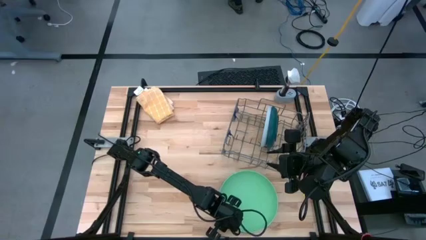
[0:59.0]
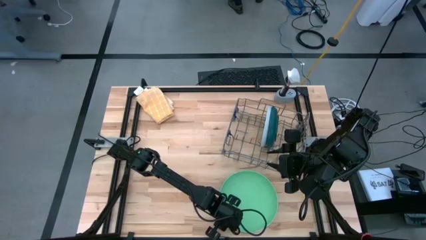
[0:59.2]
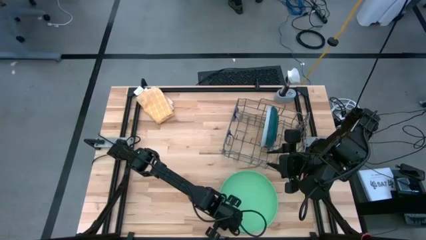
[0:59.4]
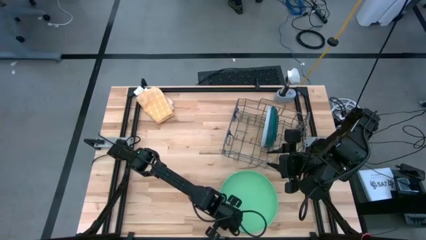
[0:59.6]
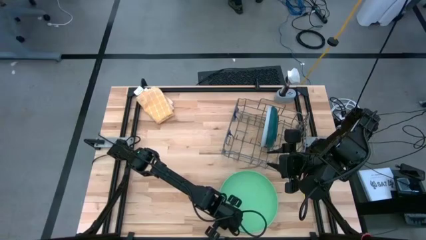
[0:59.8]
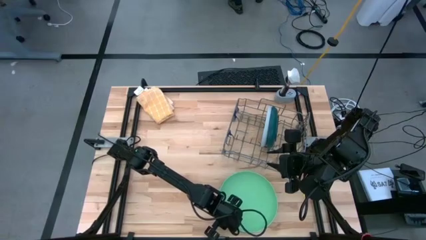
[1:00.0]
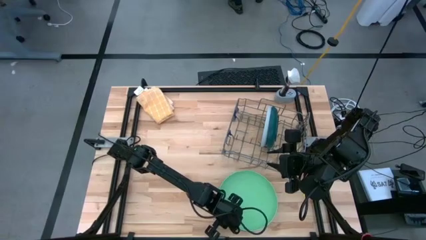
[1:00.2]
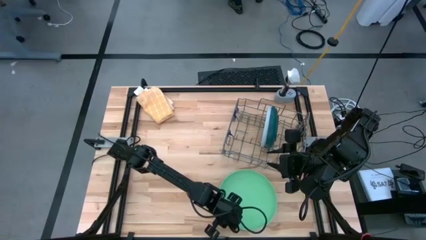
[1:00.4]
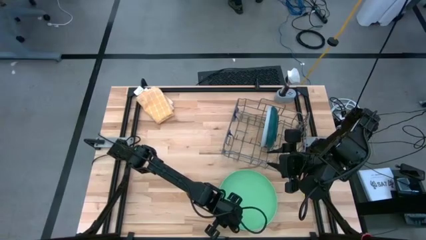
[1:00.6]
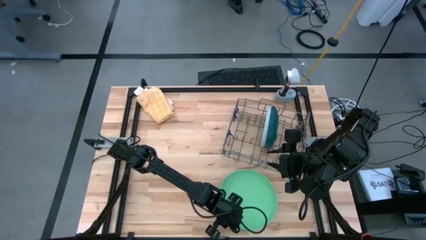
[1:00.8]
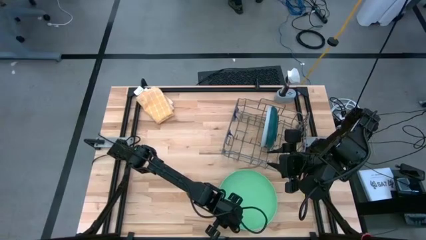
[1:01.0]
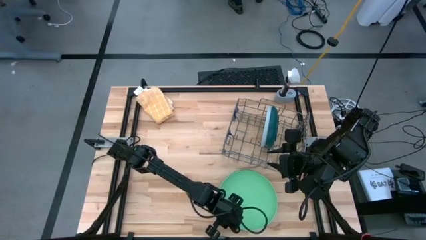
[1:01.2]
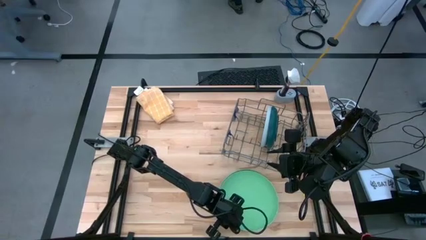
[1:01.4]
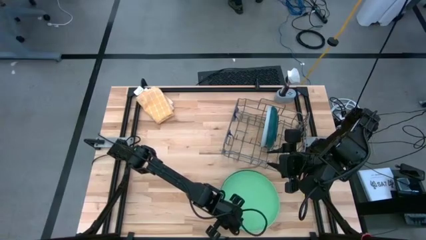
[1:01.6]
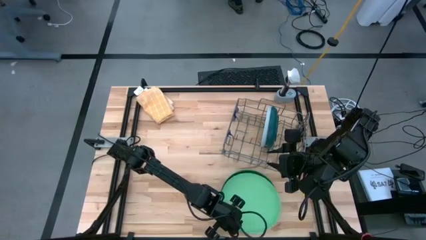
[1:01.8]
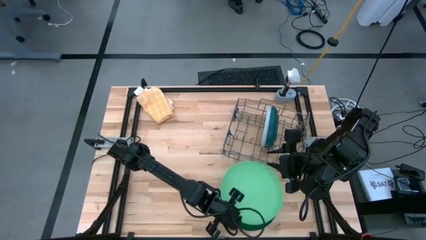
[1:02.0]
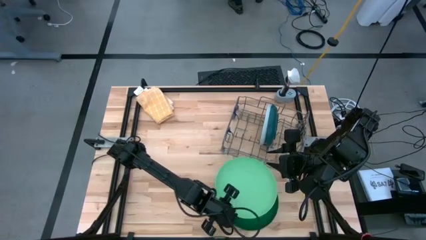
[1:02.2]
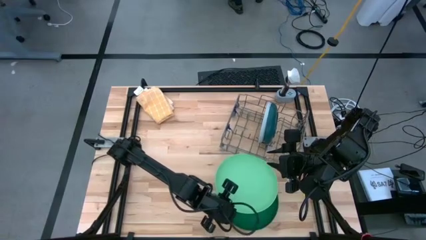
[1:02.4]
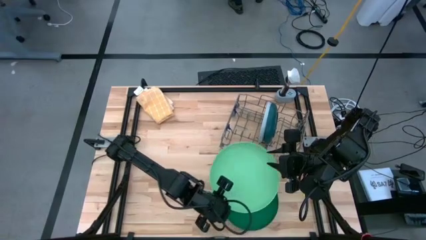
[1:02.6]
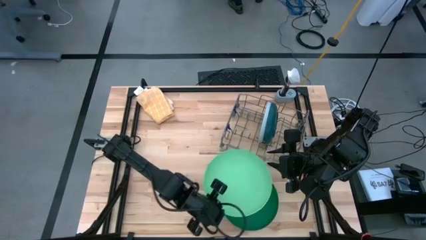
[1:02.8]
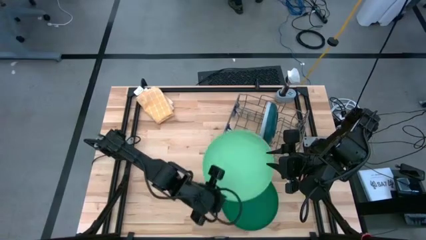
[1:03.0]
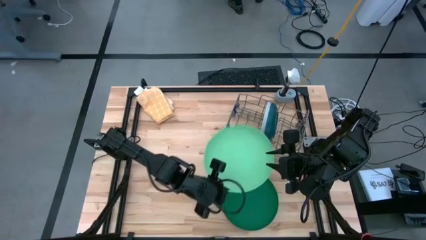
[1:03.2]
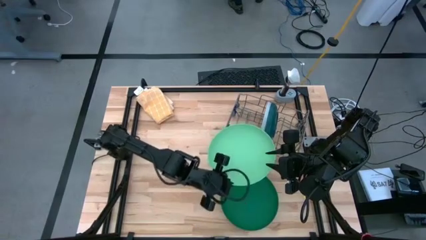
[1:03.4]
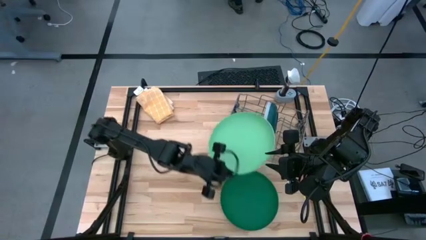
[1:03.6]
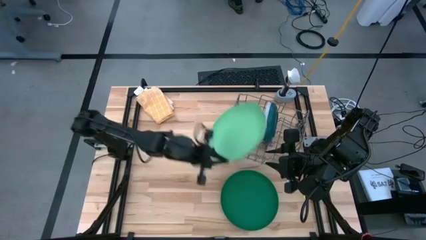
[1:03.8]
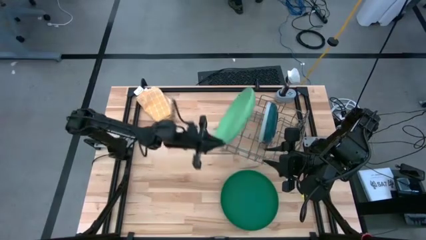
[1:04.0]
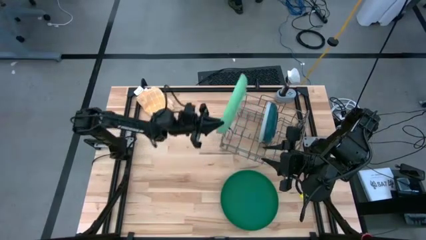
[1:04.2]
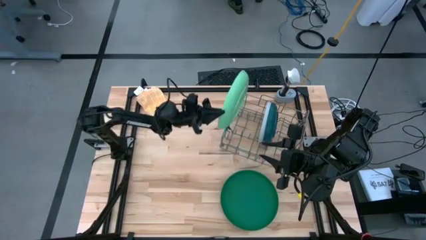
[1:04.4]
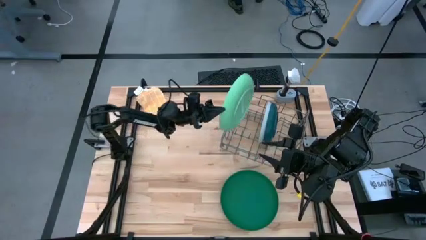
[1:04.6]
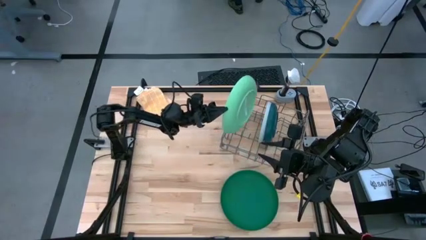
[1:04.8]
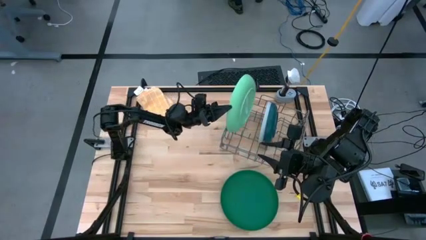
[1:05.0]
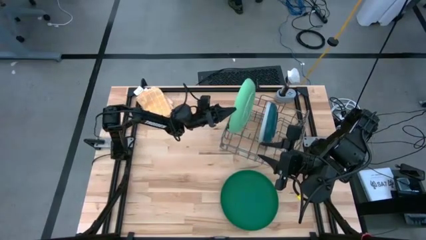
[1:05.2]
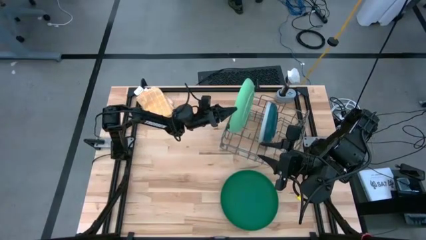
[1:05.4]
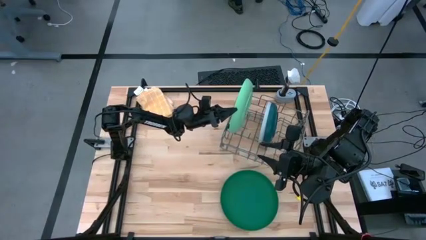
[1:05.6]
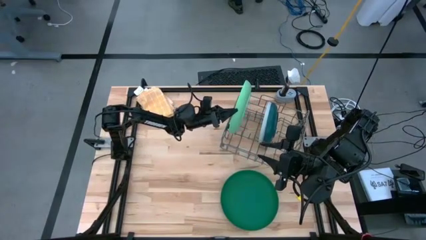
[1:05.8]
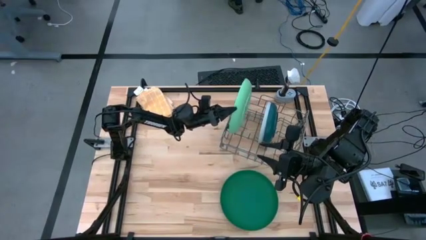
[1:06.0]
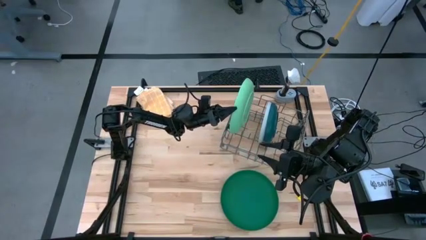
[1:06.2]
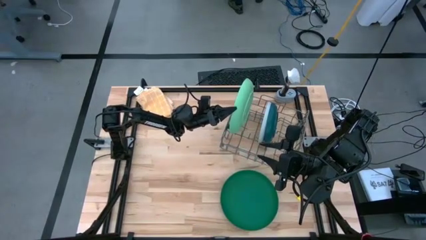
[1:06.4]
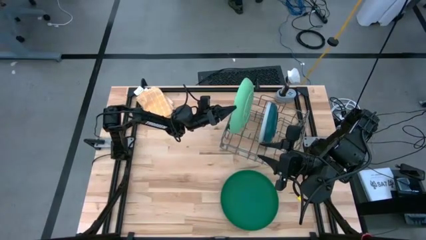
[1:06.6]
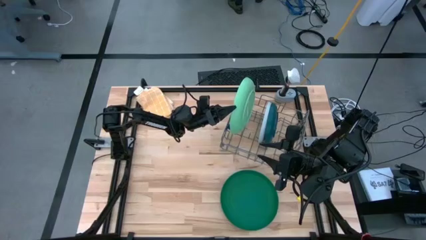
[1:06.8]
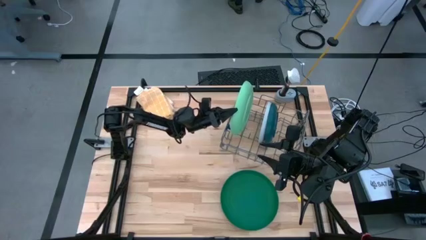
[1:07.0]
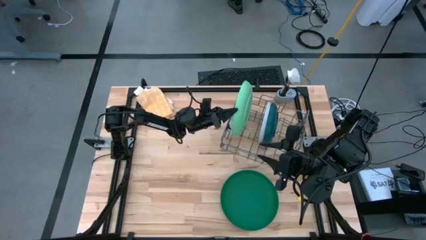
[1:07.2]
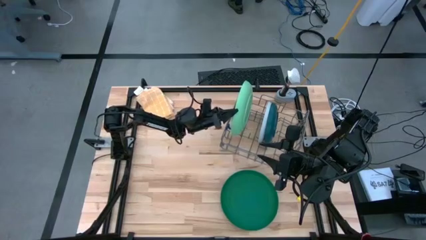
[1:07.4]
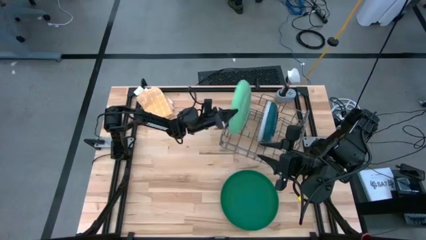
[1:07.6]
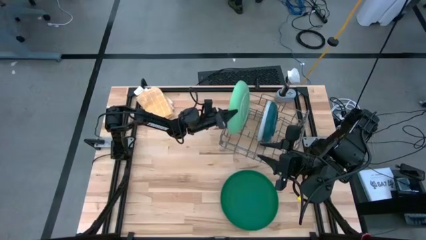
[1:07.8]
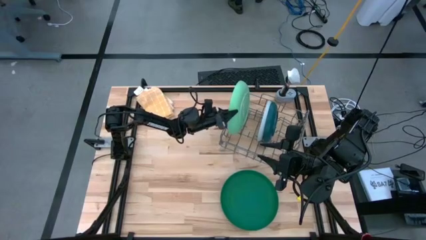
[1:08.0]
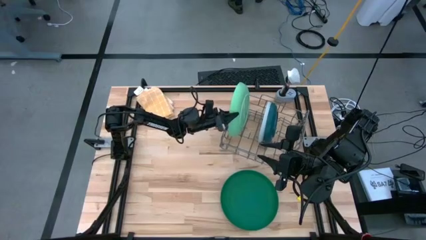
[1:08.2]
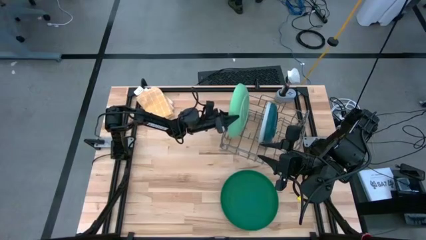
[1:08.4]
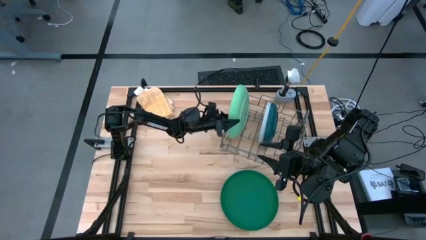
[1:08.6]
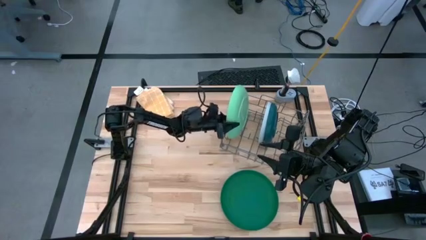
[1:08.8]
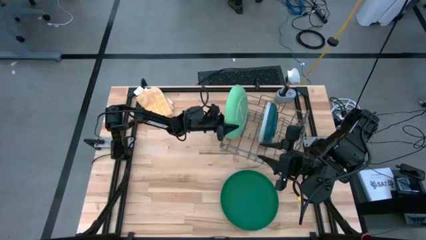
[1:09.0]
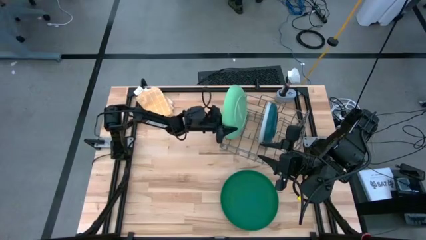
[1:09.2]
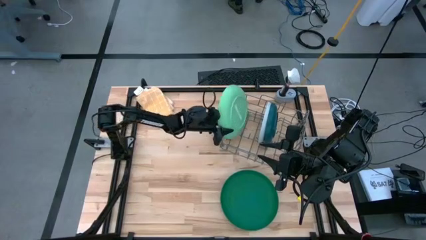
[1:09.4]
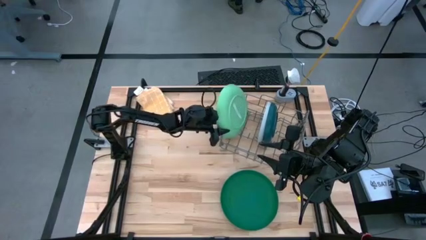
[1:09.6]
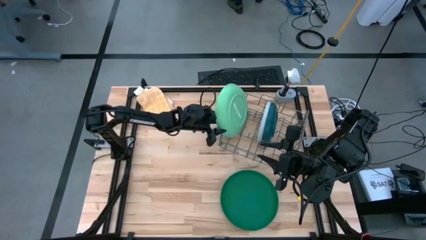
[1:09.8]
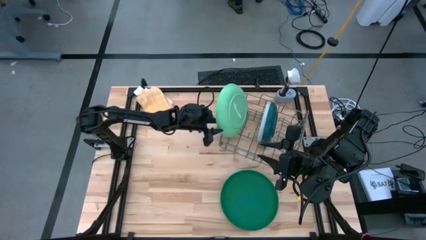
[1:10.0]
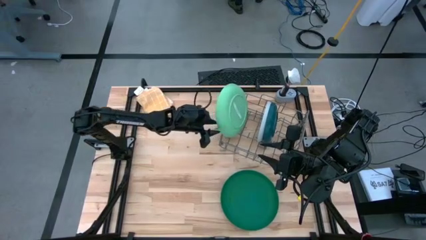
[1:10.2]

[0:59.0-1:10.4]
Task: Sort dishes
Put the light green plate in the dish rack

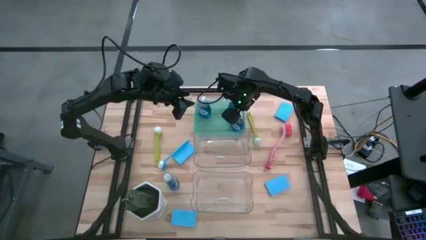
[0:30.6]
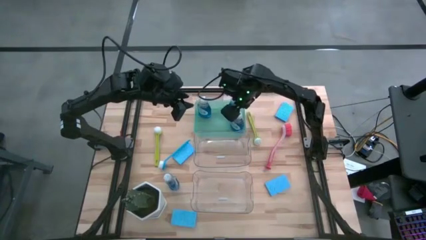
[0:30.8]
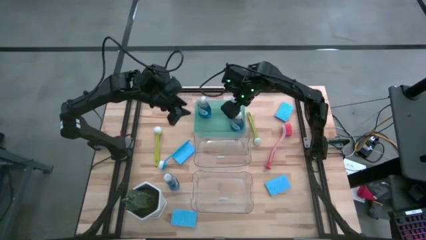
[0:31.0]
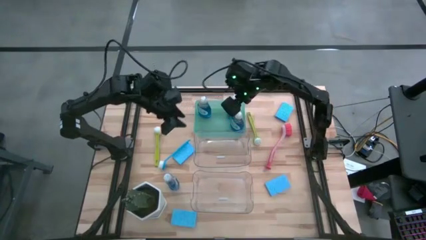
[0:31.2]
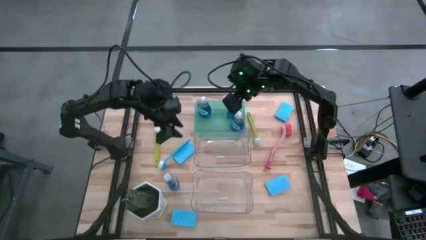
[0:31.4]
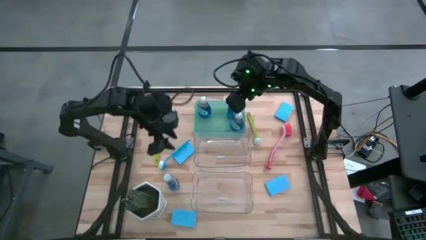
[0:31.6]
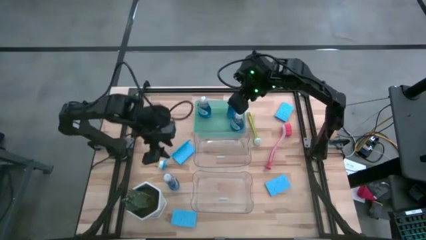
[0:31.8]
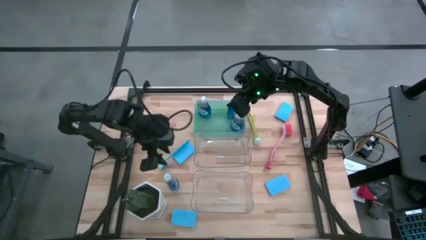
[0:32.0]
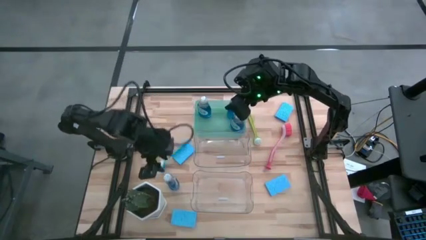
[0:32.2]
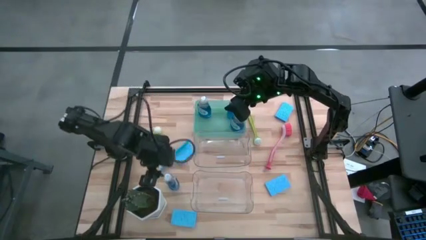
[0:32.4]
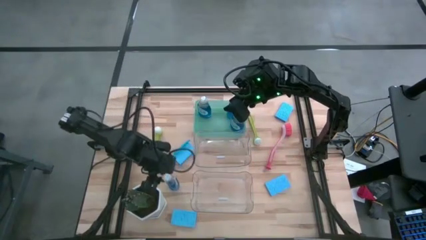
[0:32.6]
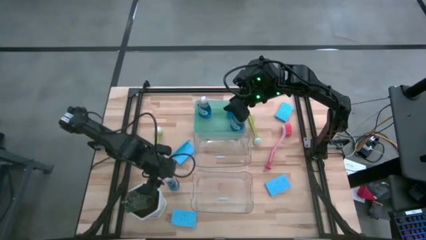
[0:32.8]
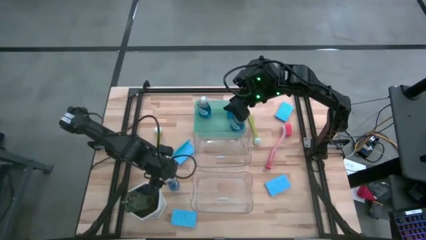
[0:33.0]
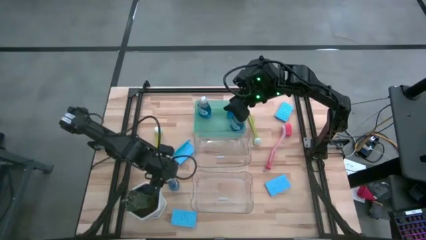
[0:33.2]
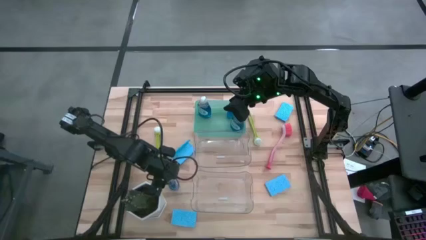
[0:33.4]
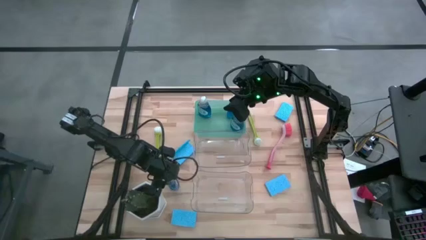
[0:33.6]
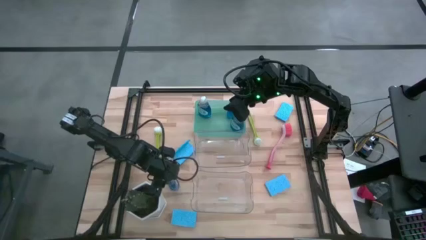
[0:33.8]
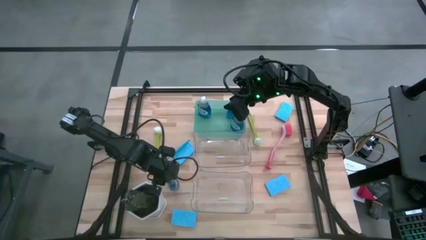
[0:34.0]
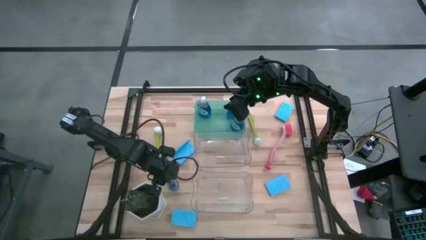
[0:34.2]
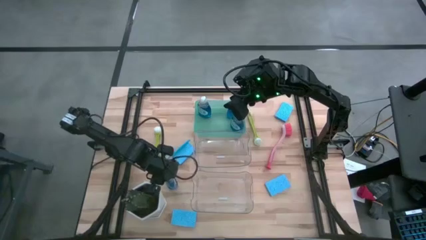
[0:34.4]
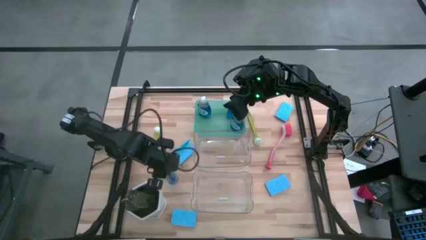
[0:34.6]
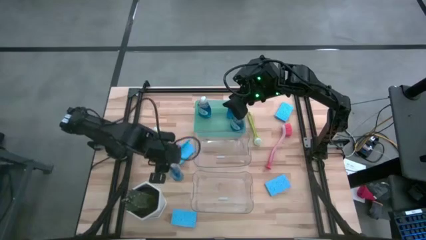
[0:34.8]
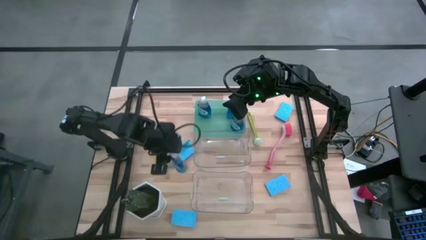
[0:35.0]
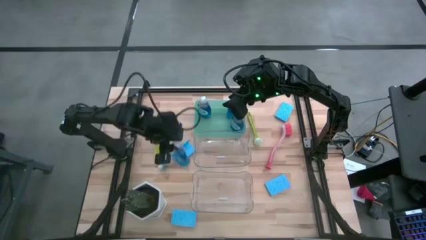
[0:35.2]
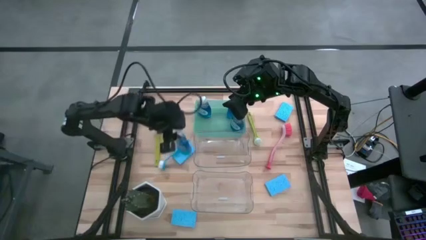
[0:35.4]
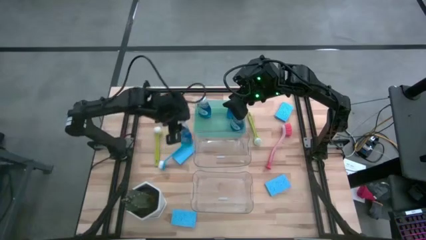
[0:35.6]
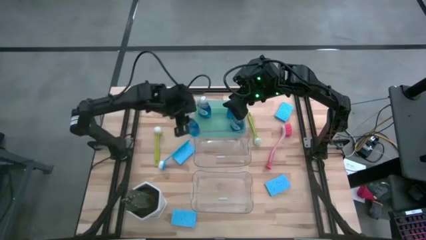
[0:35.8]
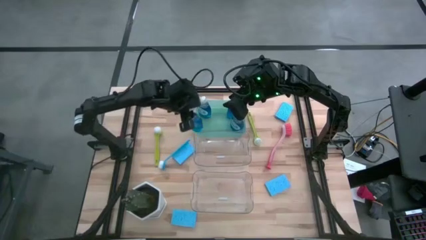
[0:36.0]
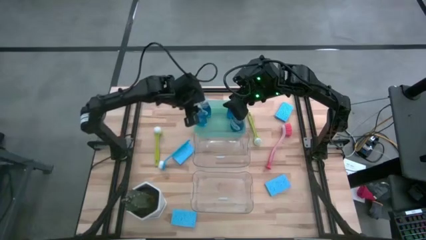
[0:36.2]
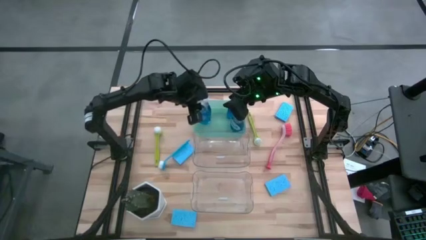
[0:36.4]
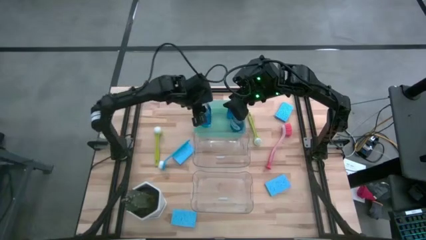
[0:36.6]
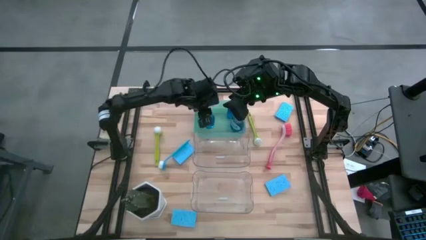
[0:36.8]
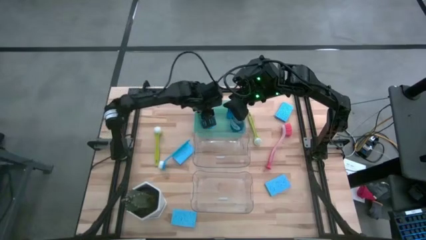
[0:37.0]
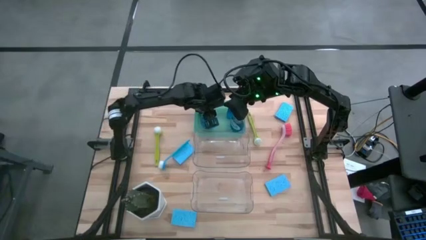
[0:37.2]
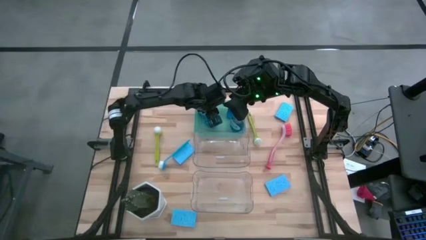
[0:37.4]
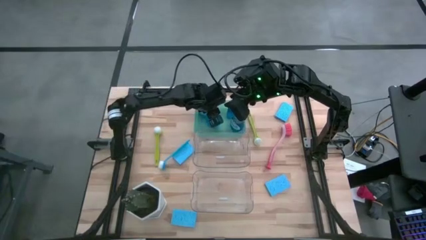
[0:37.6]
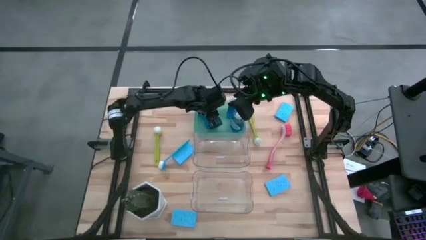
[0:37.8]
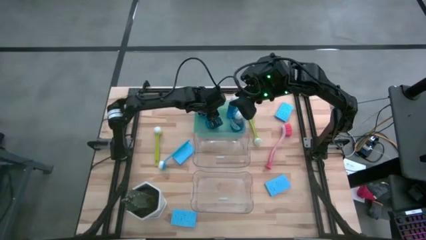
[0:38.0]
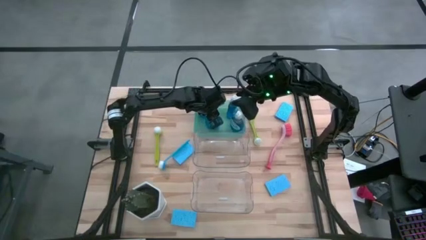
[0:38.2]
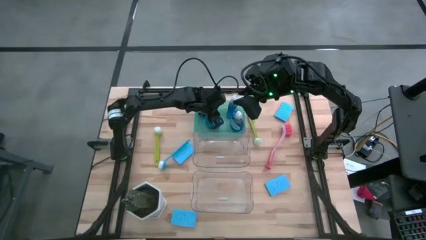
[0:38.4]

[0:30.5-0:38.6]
Task: Pick & Place Kitchen Sink Supplies
Put the blue dishwashing liquid into the green bin
